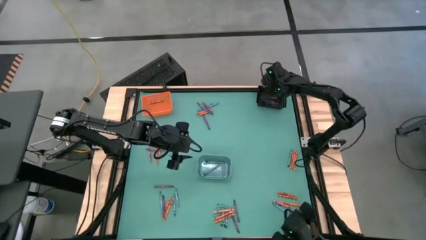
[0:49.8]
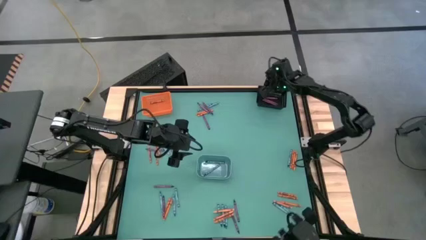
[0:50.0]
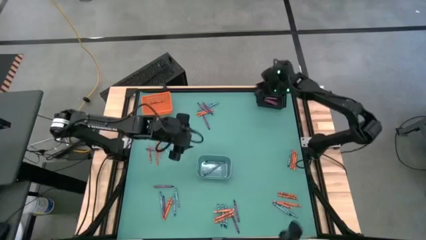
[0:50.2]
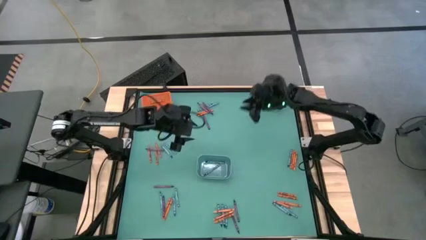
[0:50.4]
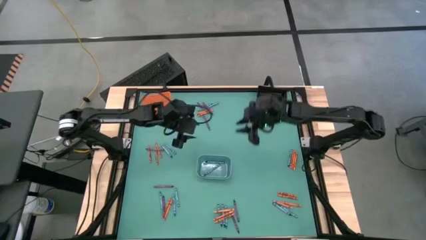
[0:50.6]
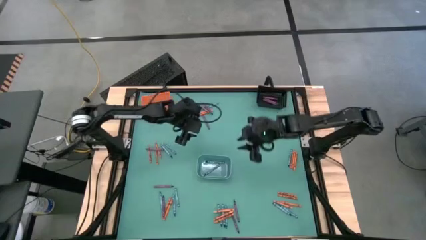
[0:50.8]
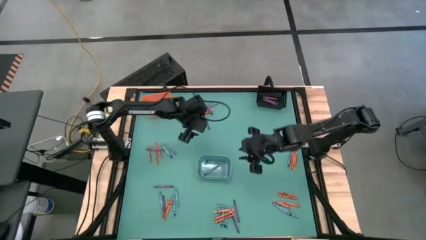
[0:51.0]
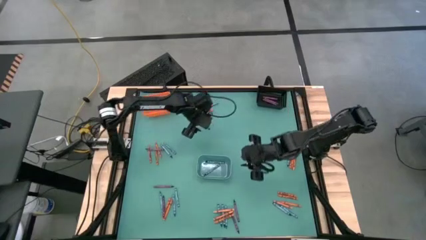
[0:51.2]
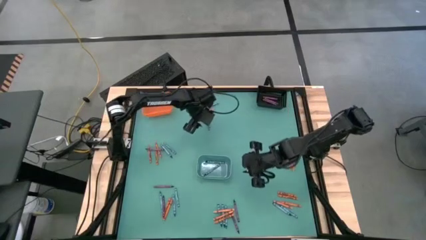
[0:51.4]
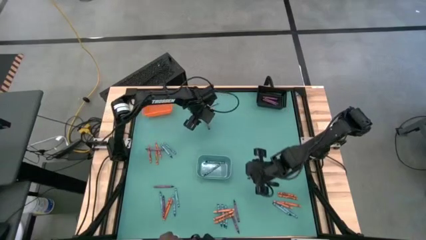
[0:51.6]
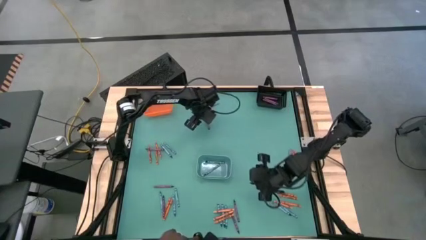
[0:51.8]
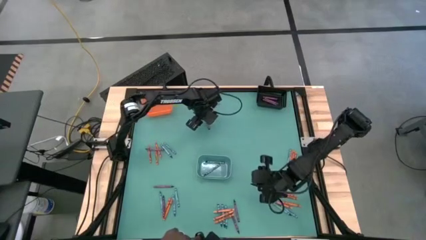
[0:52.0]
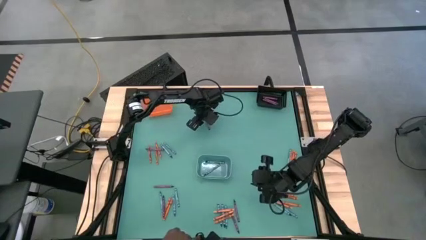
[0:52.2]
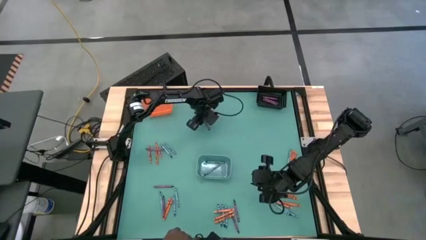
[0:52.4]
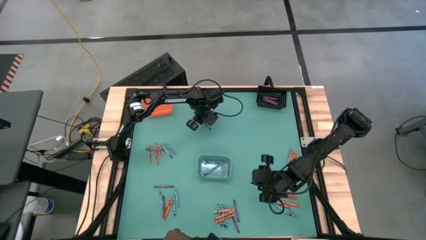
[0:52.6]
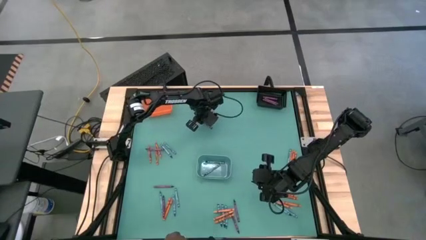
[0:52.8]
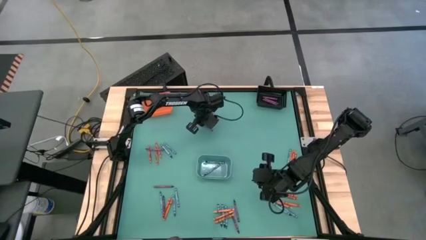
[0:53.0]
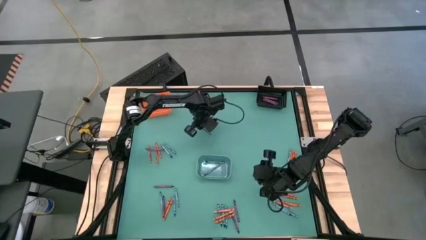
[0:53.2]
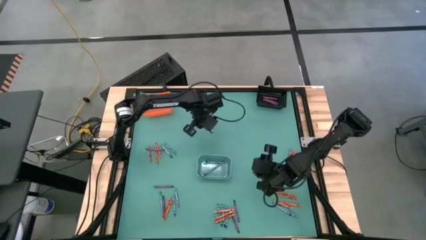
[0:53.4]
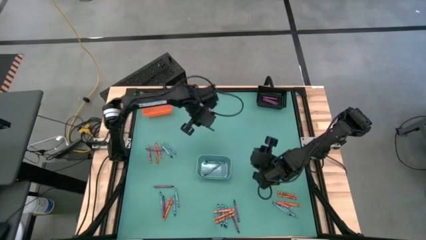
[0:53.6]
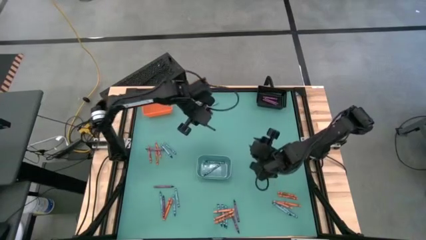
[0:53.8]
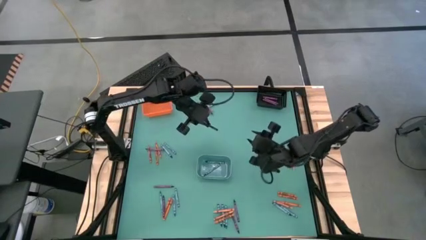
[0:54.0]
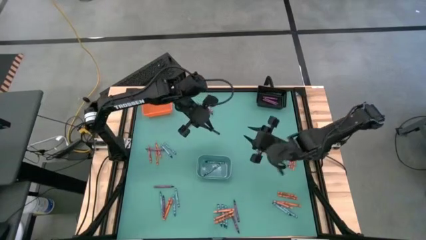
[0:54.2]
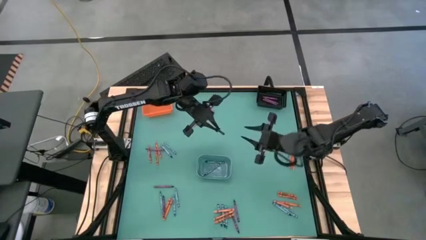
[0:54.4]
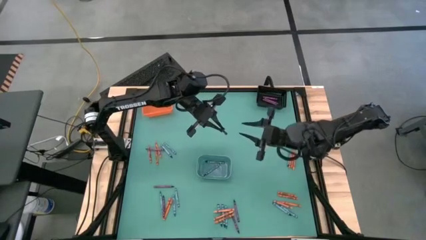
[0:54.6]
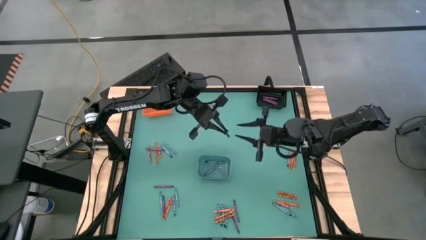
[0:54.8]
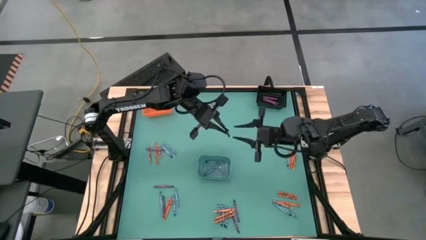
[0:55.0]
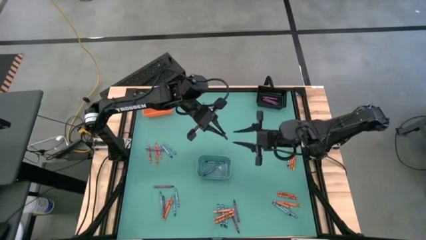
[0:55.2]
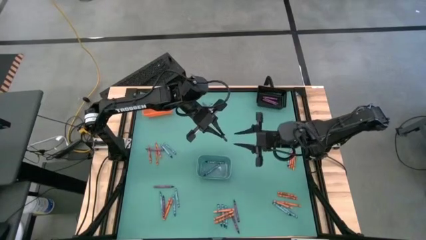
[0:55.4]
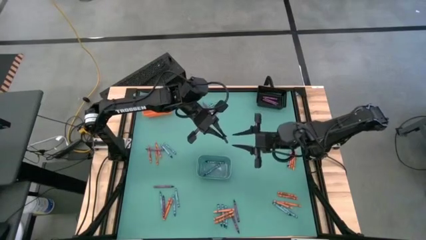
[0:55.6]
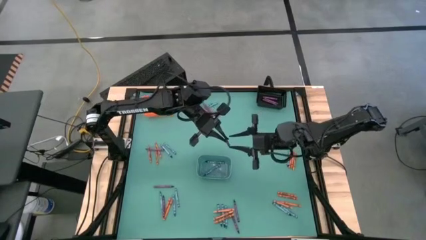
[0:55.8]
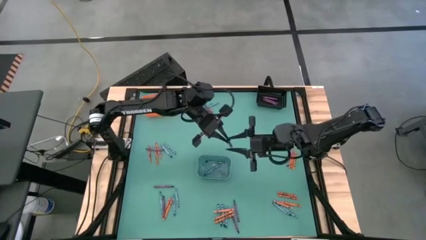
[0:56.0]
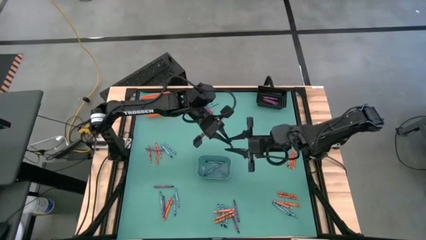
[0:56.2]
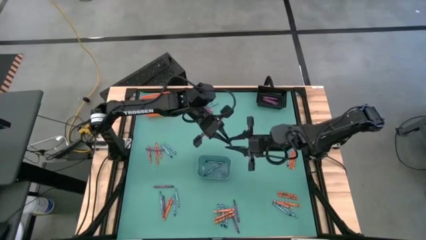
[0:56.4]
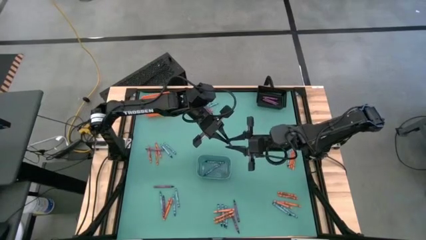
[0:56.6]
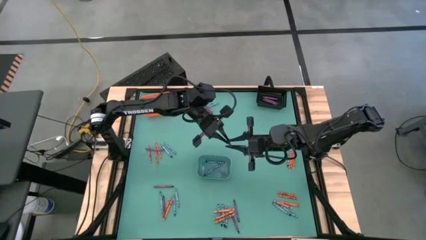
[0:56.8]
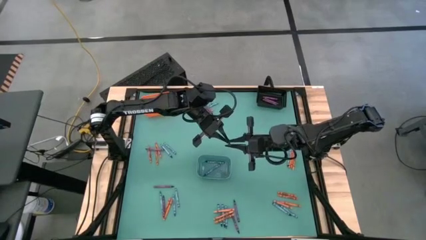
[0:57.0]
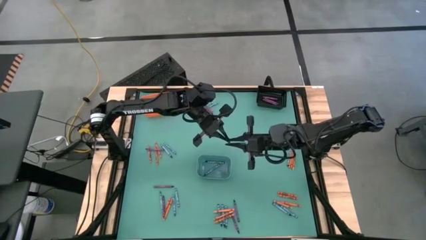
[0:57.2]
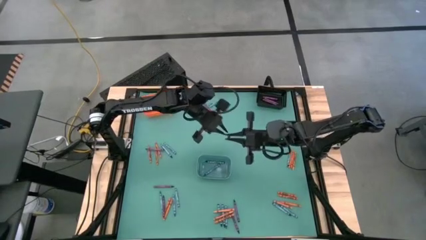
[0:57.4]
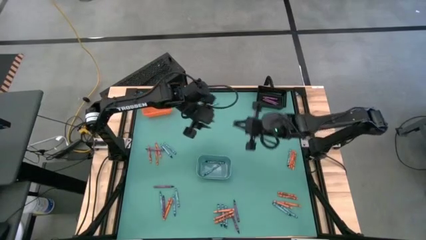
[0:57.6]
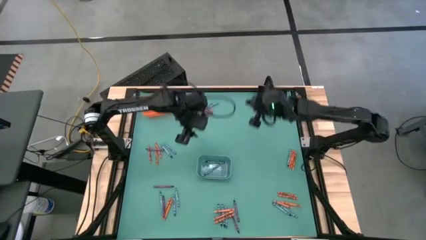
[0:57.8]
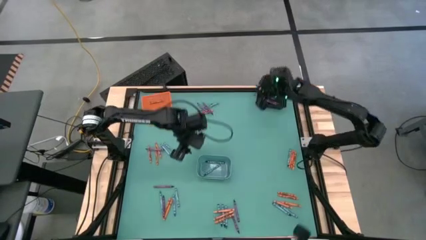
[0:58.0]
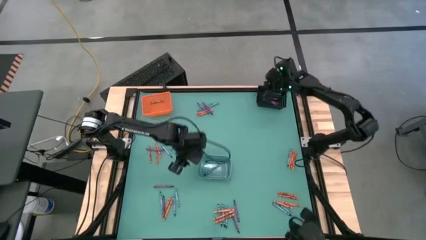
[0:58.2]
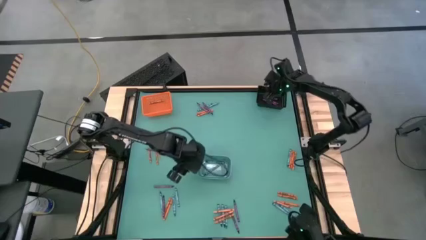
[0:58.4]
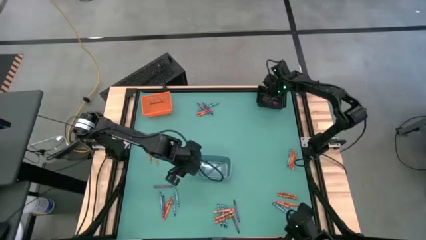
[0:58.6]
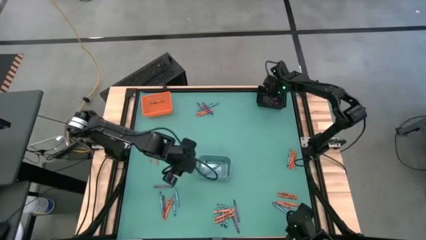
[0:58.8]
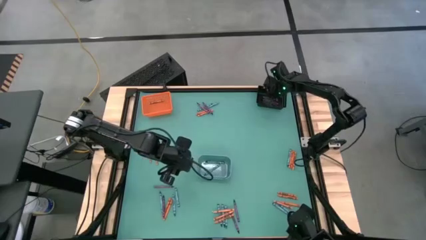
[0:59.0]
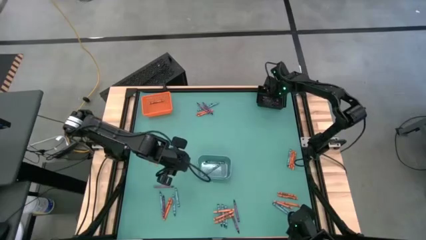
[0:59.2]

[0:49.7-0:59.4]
Task: Sort crayons
Put the violet crayon into the black bin

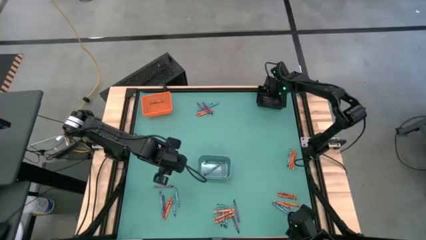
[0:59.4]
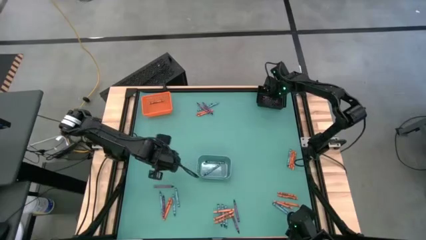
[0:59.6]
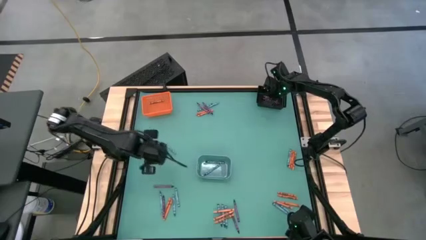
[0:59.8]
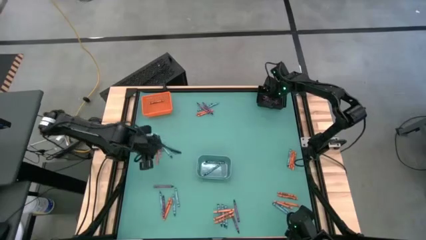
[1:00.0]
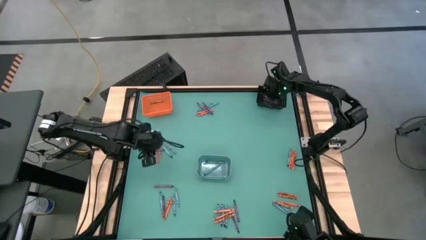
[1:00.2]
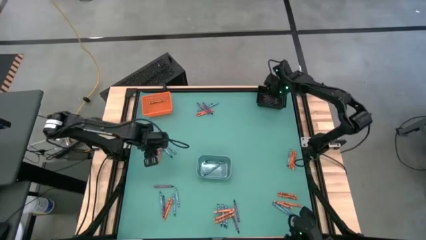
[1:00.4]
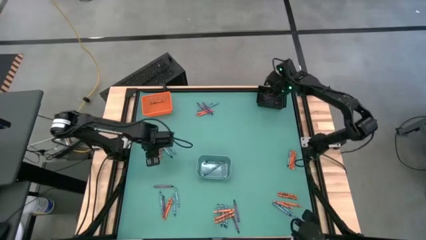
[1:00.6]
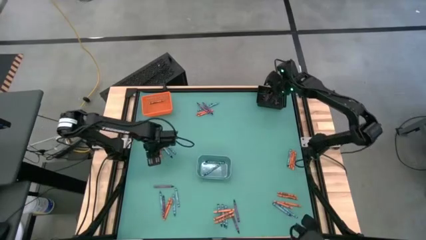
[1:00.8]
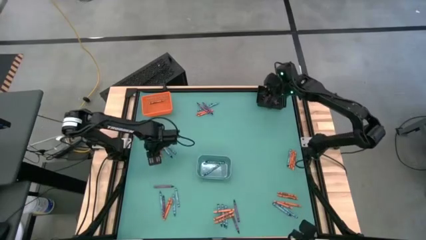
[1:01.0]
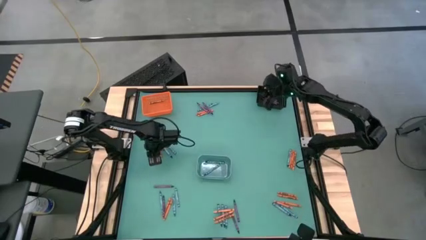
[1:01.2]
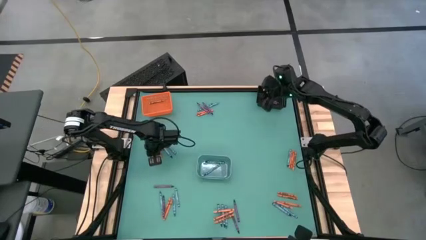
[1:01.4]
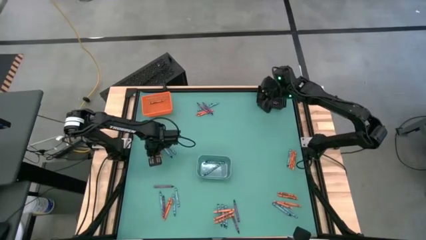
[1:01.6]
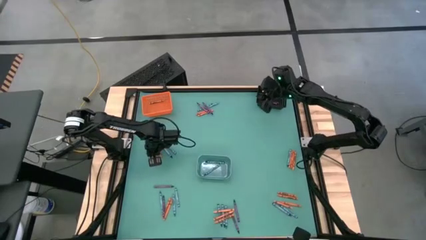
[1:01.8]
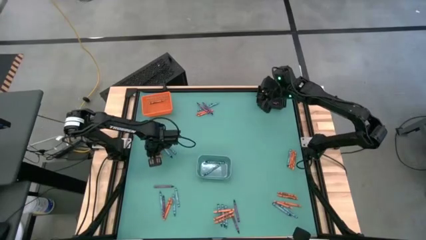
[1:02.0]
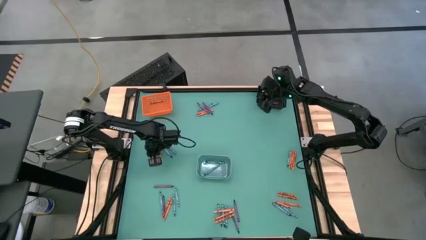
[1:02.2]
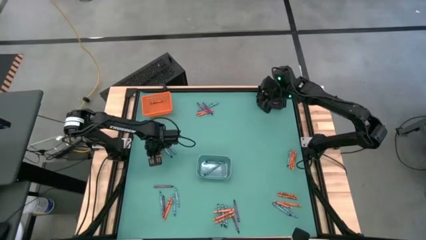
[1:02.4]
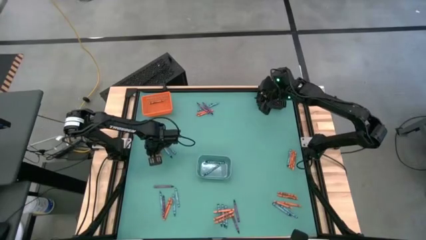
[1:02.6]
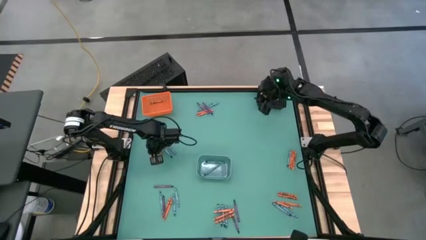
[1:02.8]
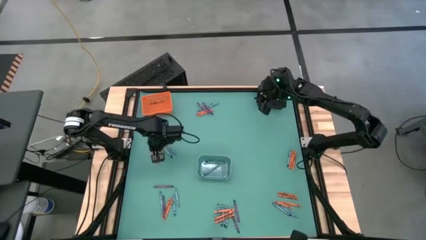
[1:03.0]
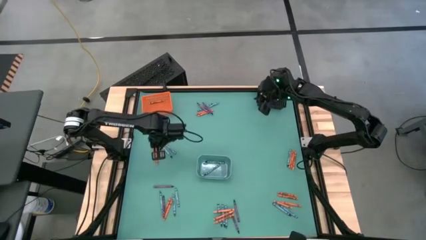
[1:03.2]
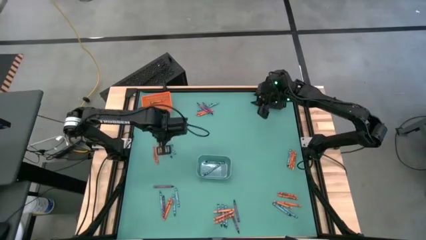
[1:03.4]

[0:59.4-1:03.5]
Put the violet crayon into the black bin

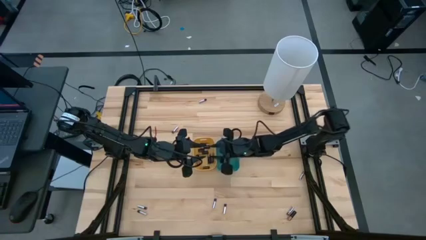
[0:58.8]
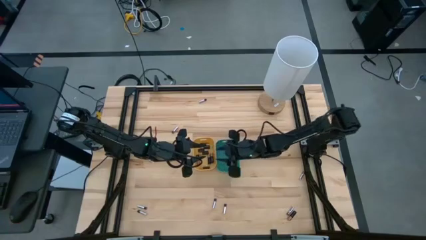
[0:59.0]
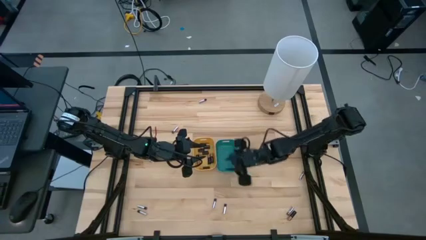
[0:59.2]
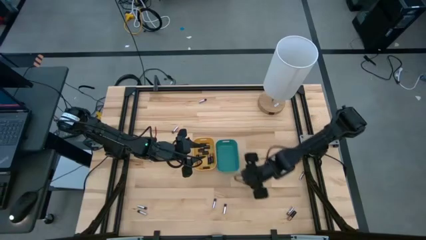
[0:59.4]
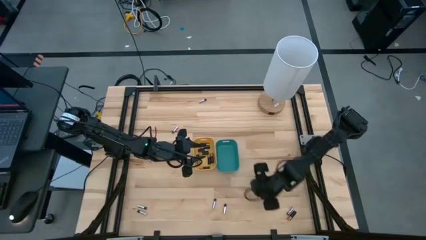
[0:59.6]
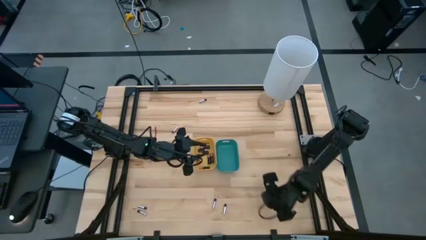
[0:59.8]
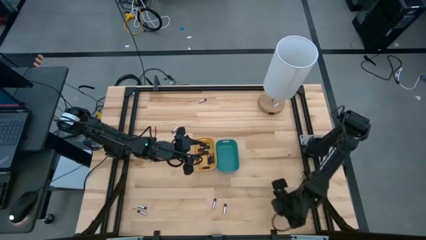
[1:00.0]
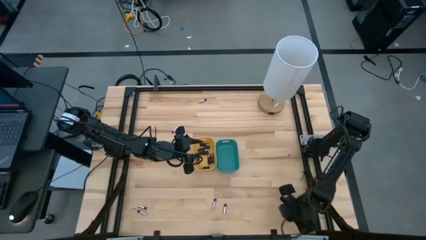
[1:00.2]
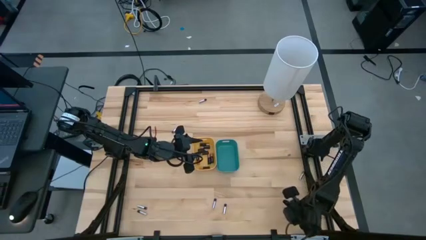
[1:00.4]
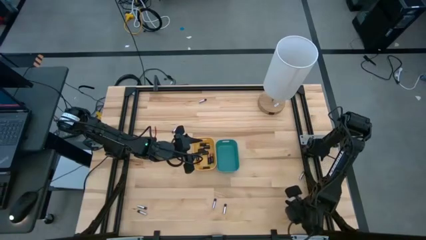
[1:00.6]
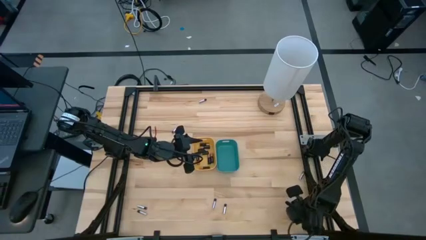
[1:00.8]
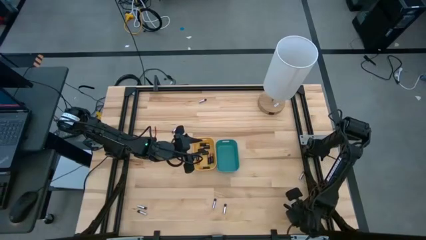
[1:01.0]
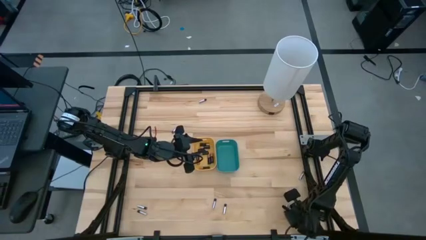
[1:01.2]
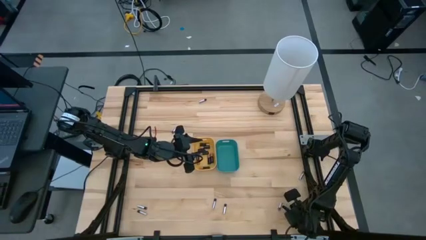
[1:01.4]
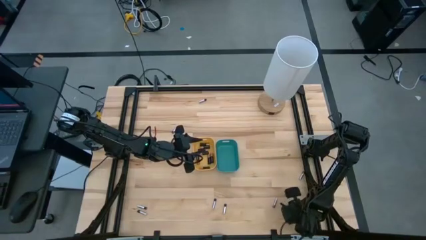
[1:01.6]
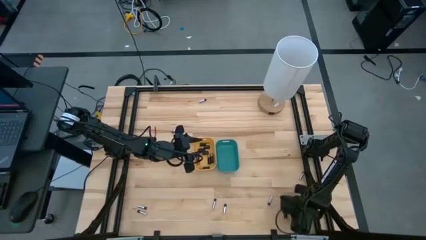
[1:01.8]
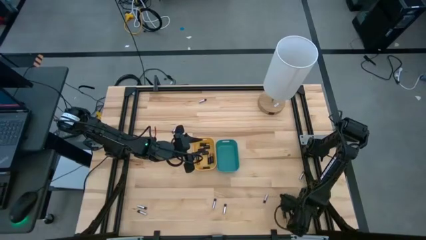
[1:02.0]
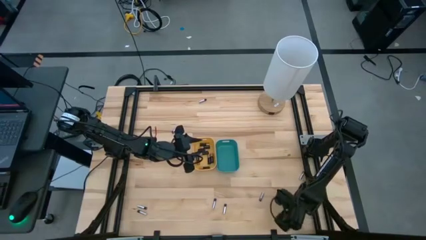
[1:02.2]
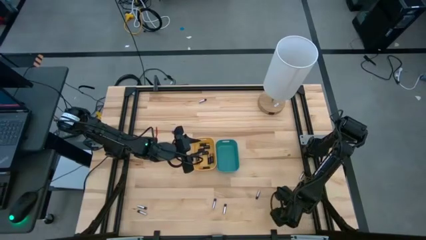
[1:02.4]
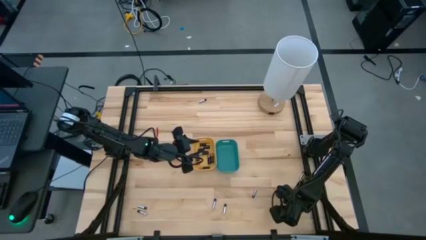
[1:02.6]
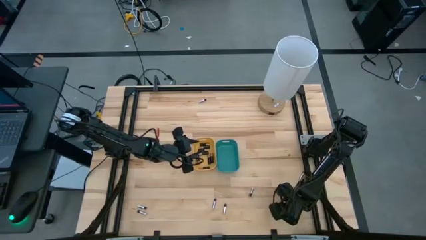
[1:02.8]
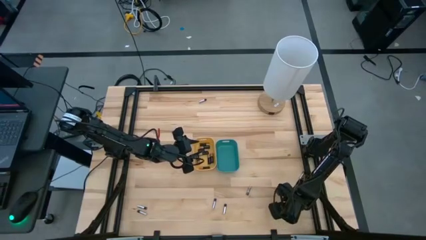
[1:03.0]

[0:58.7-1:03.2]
Task: Sort batteries
Put the black battery into the yellow bin
